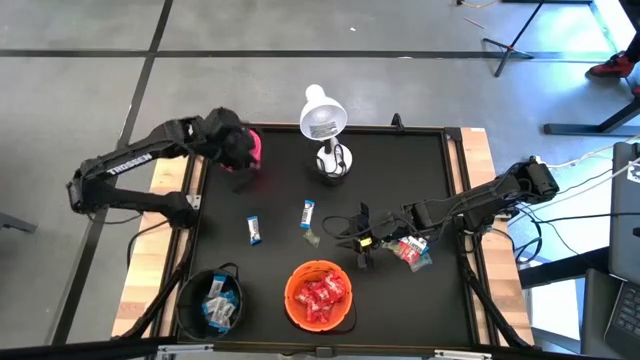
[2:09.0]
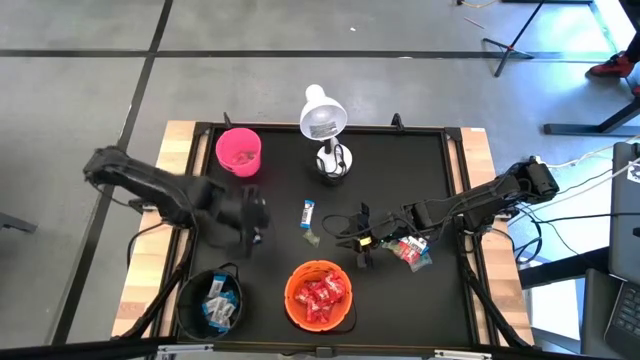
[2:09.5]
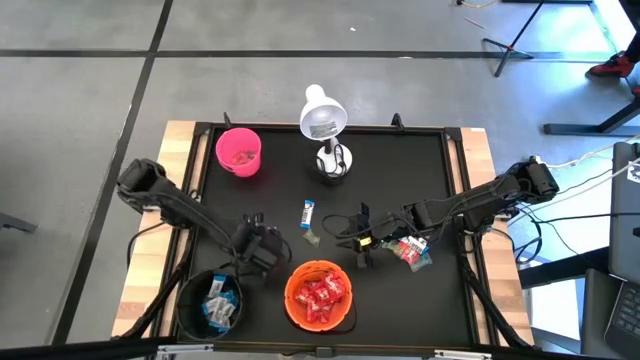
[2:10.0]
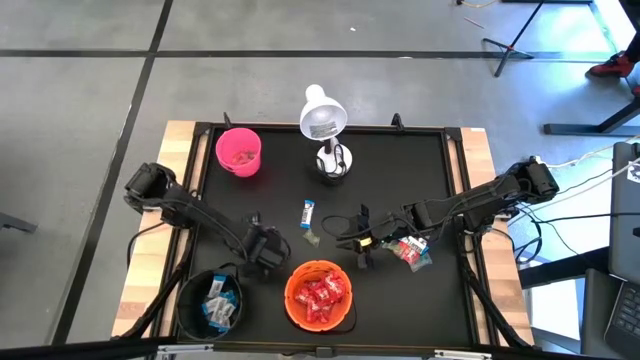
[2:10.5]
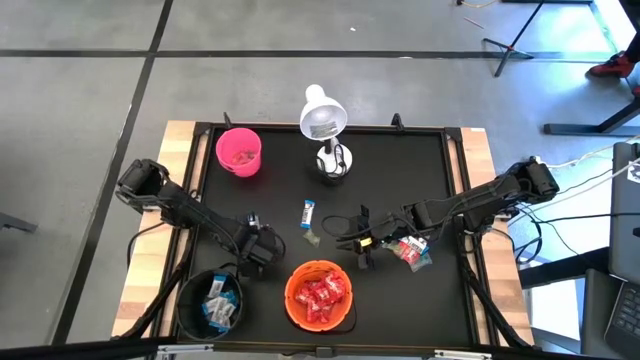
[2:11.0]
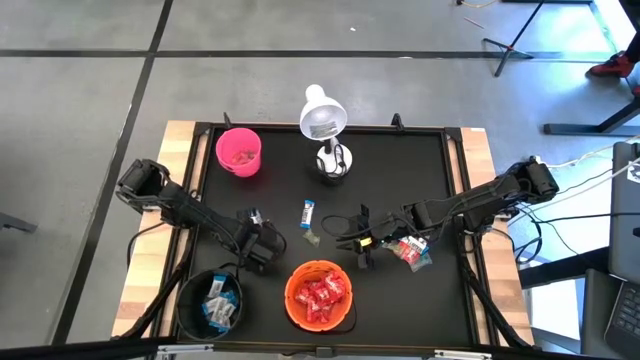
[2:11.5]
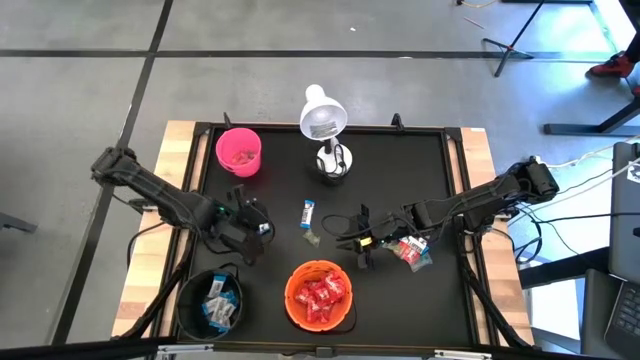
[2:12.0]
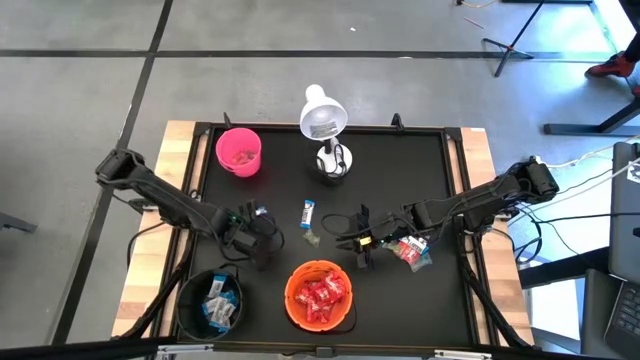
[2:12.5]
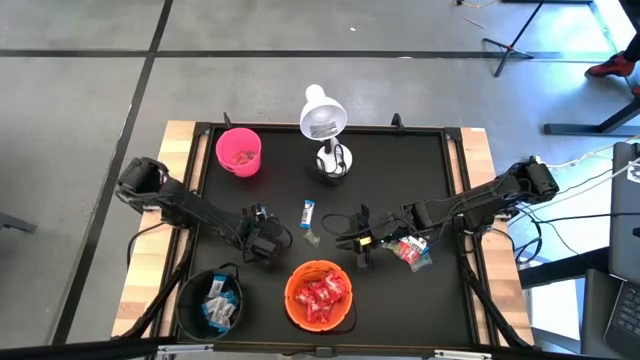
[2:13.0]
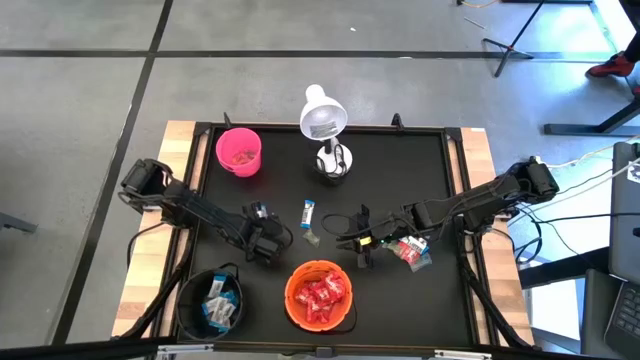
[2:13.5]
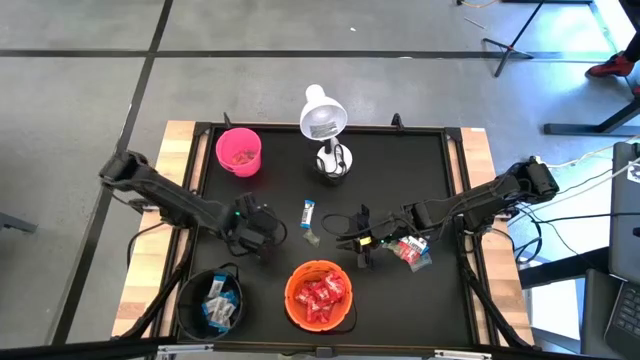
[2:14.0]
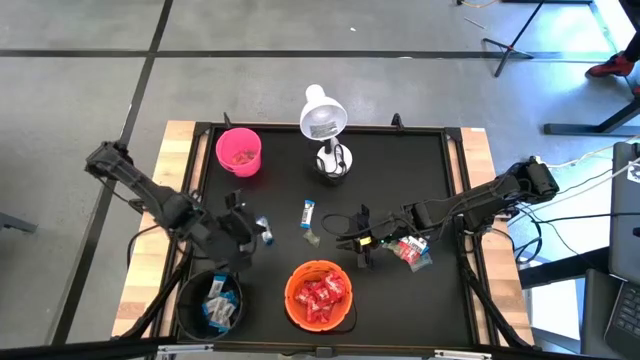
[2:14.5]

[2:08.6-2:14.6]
Task: Sort candy
Put the white candy into the black bucket

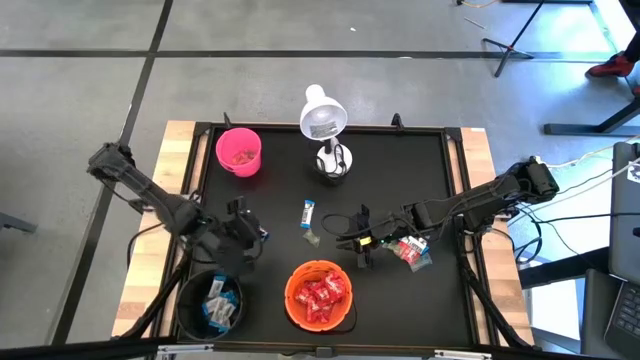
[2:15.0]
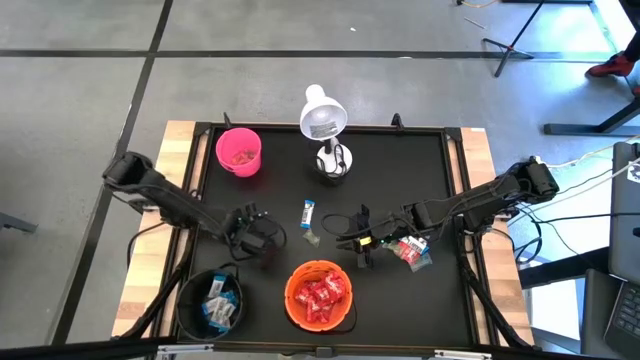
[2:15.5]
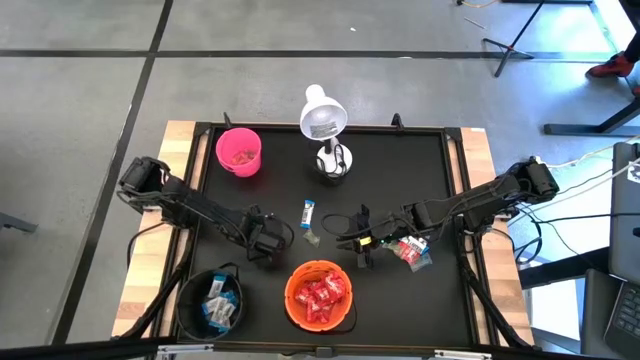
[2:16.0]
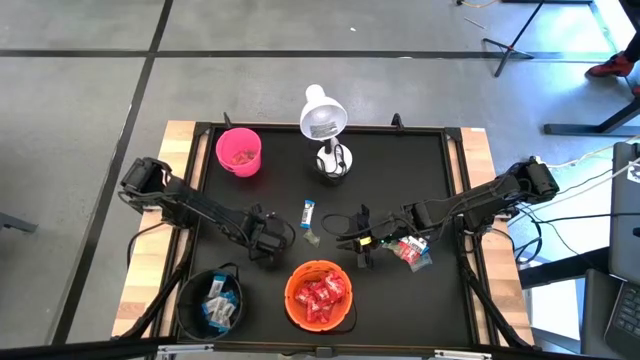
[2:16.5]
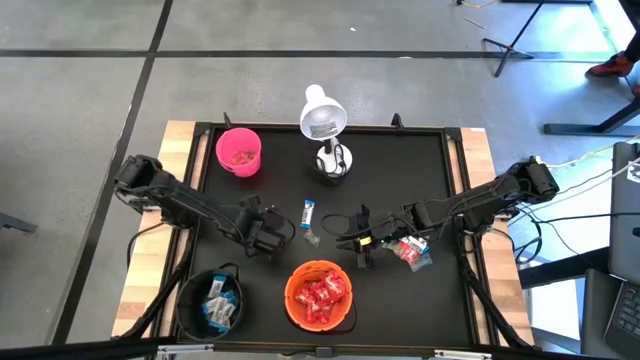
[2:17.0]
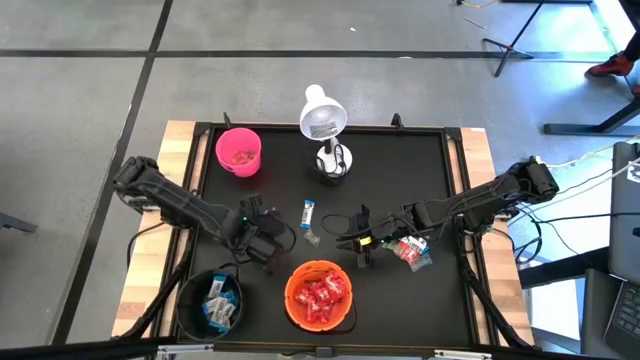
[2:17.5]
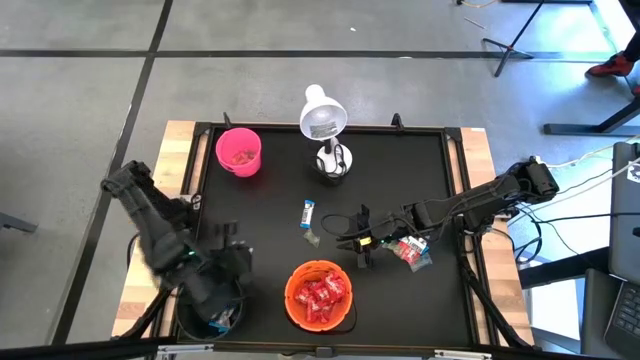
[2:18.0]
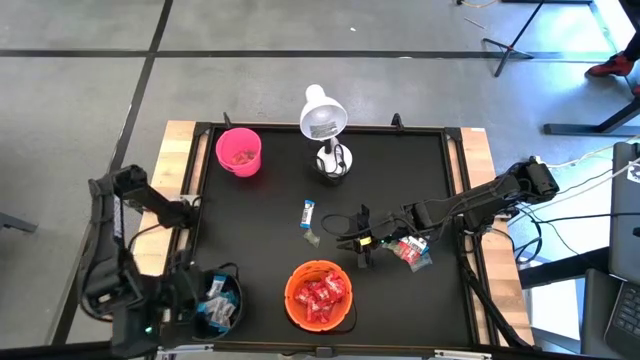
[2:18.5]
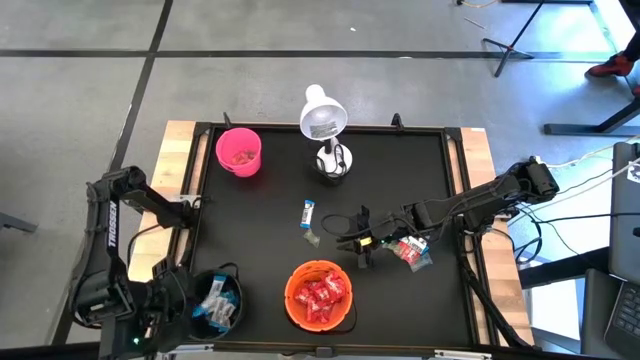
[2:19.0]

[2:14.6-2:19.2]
Put the white candy into the black bucket

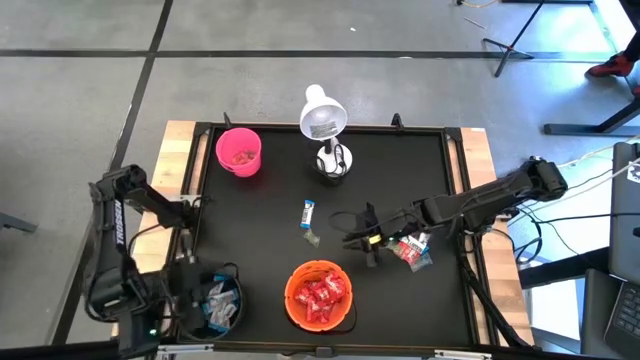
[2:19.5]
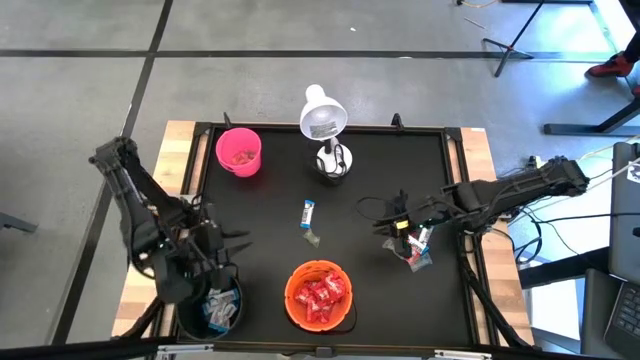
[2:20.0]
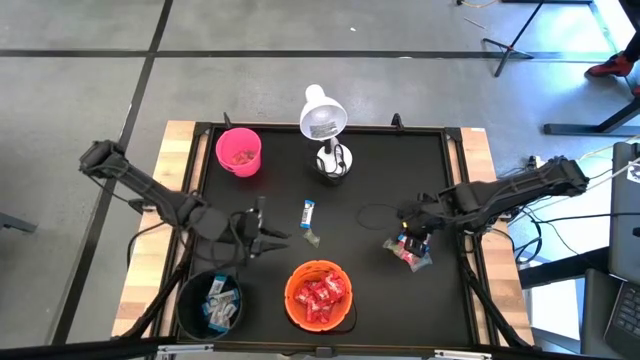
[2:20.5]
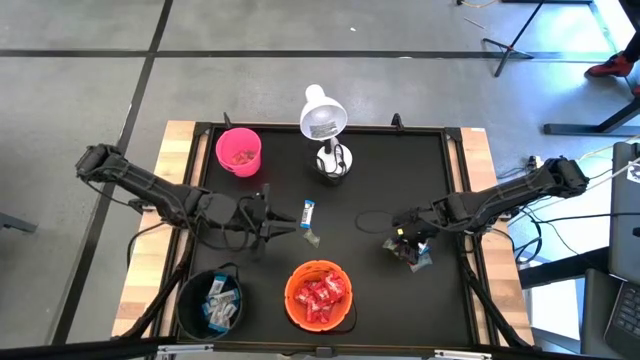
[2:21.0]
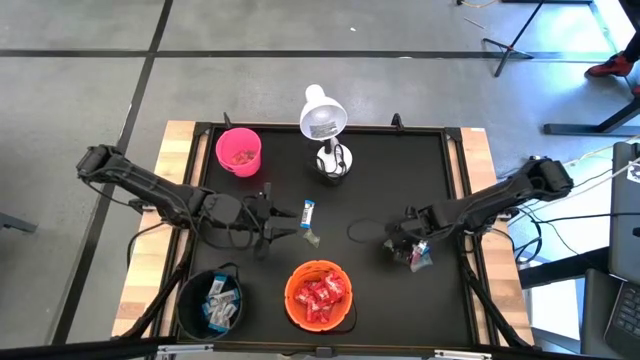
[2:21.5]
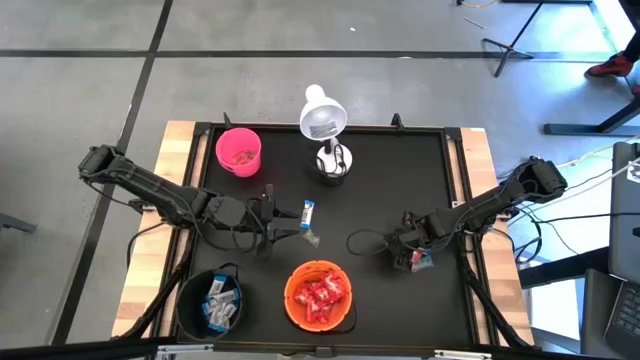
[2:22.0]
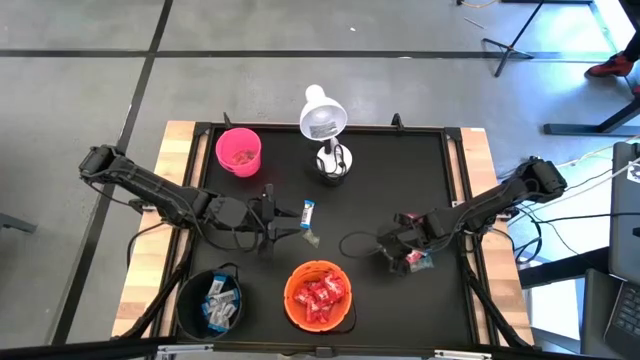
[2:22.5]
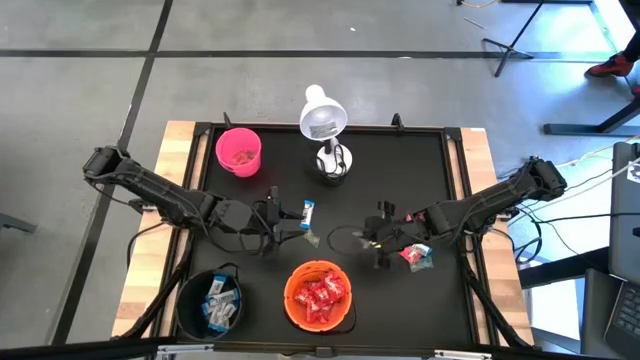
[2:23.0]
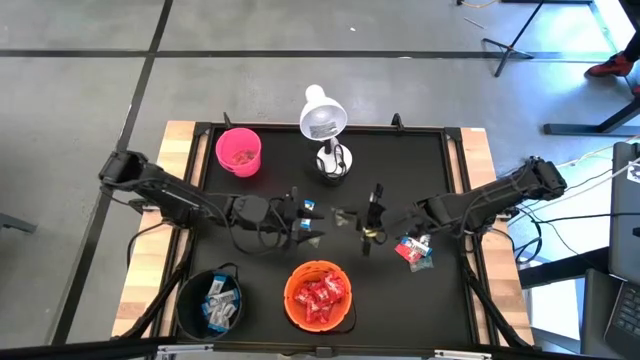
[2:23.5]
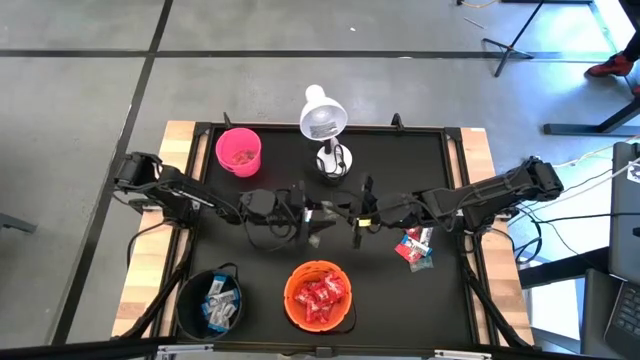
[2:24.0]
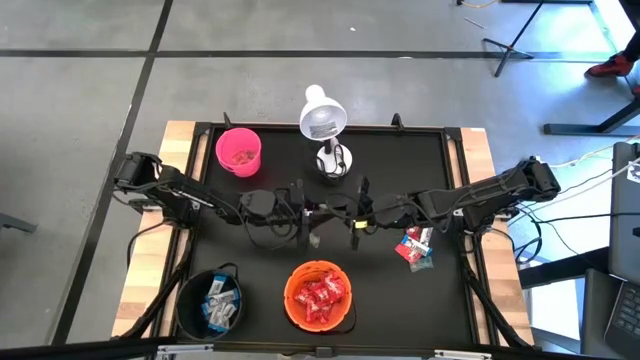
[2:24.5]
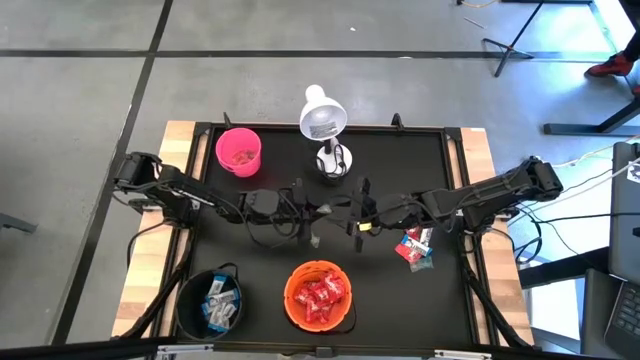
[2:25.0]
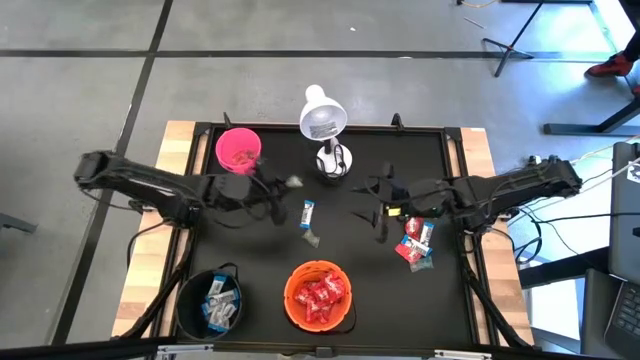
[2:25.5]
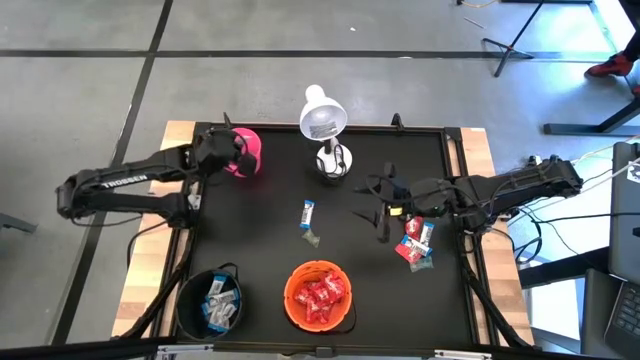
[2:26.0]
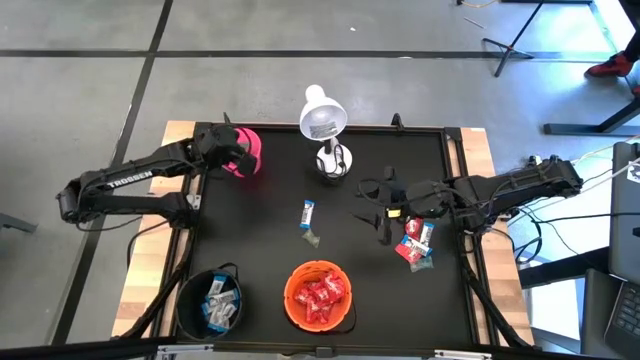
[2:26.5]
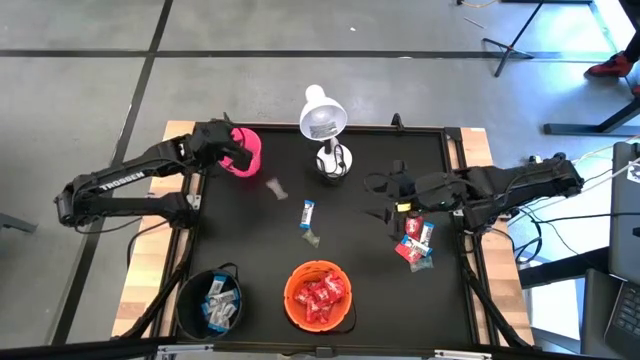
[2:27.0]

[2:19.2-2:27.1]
Put the green candy into the pink bucket

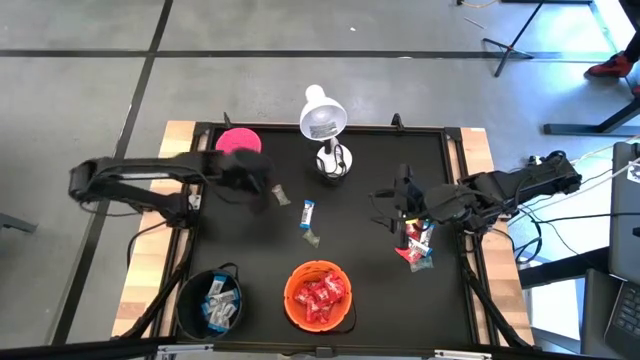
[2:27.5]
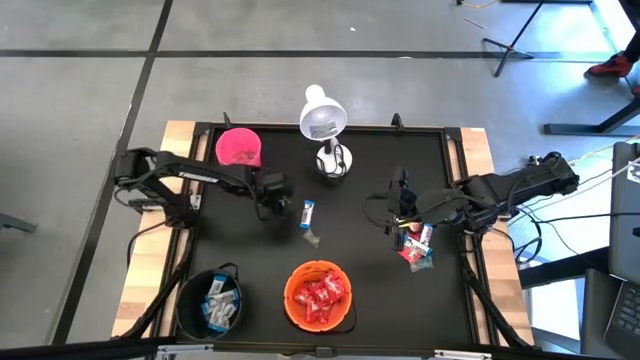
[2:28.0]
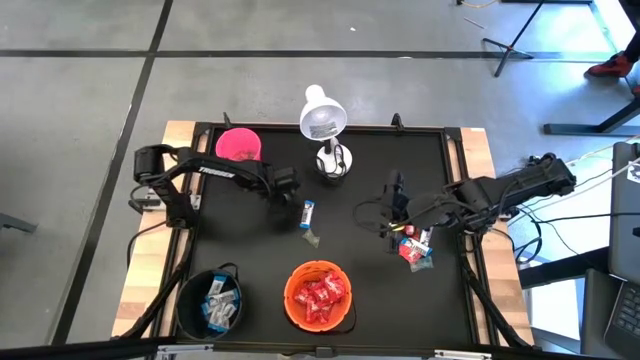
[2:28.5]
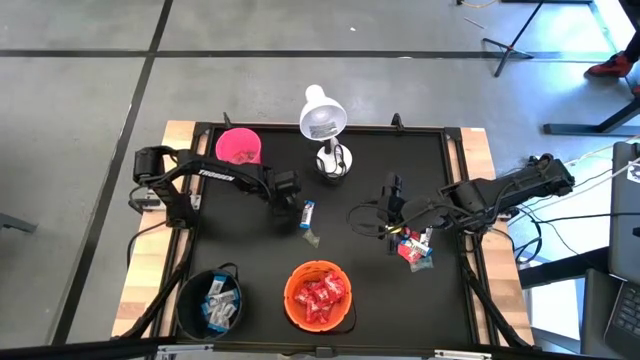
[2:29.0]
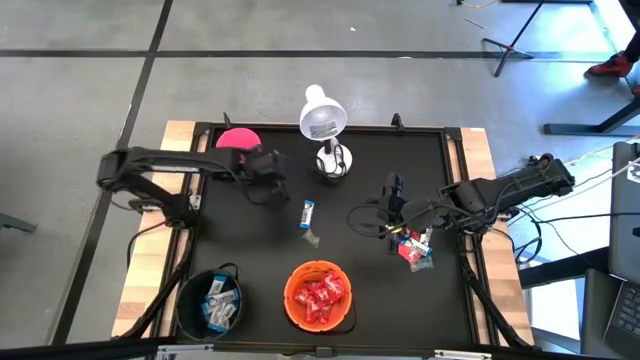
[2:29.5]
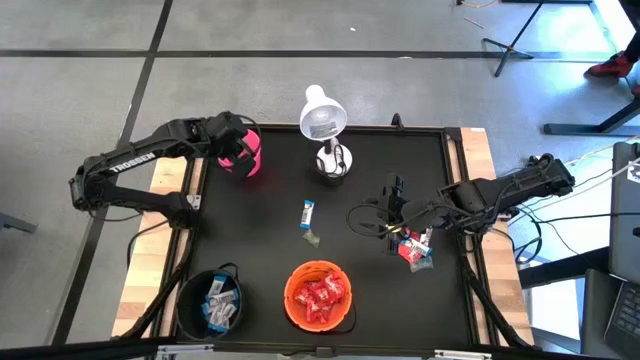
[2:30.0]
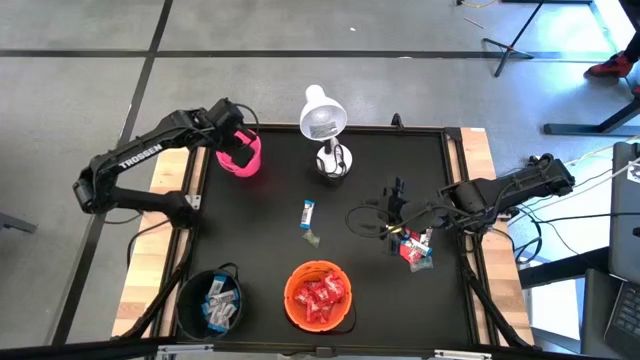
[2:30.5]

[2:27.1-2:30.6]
Put the green candy into the pink bucket
